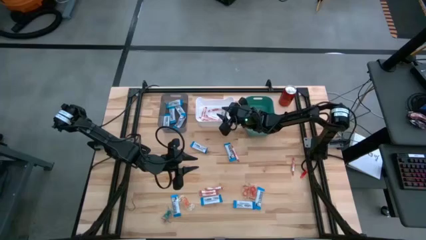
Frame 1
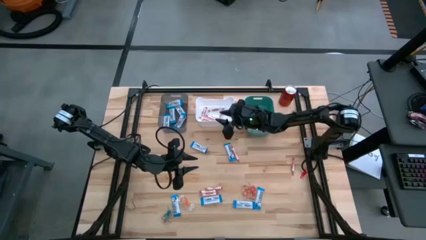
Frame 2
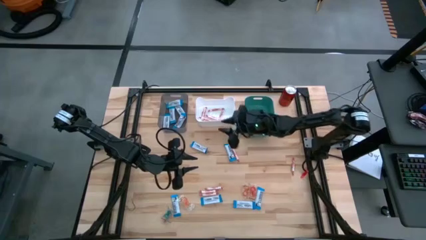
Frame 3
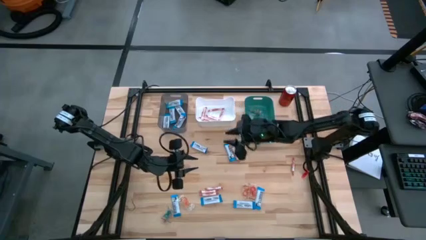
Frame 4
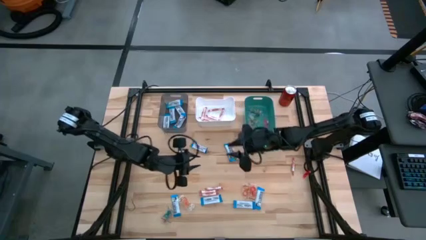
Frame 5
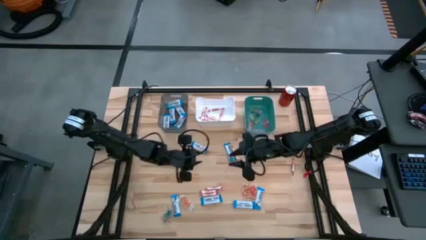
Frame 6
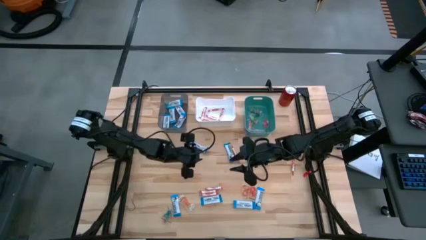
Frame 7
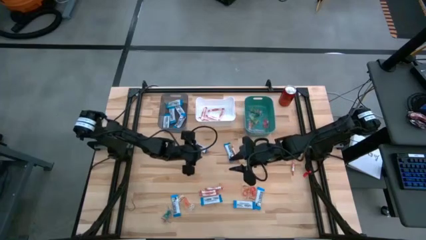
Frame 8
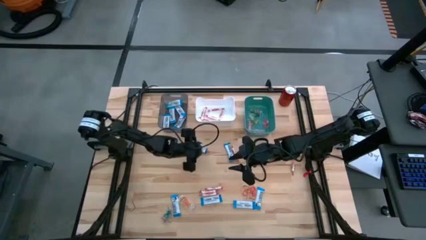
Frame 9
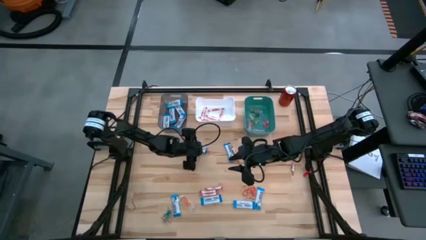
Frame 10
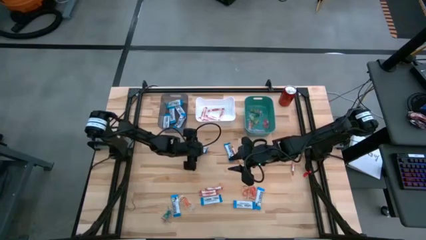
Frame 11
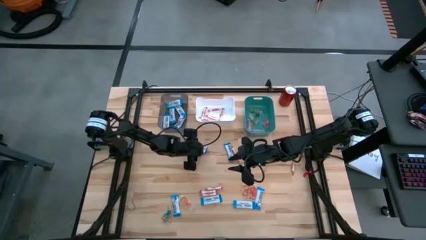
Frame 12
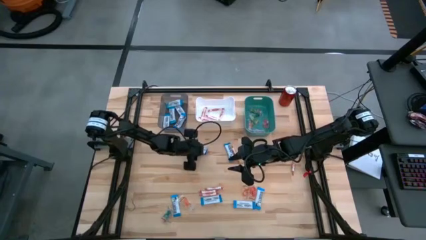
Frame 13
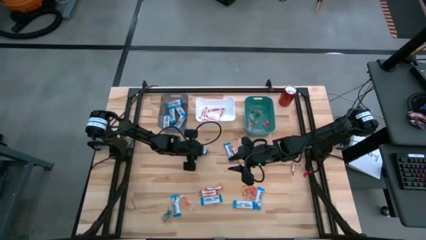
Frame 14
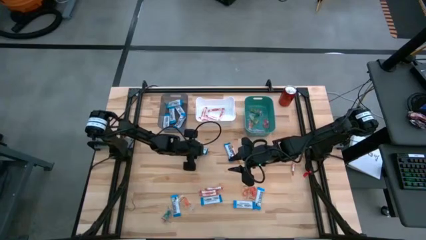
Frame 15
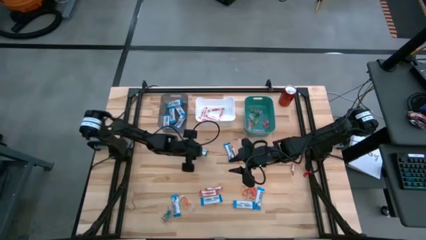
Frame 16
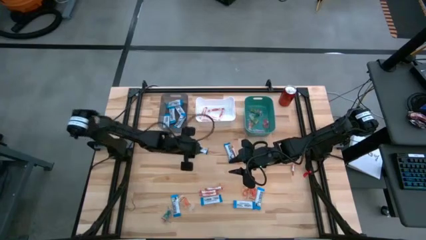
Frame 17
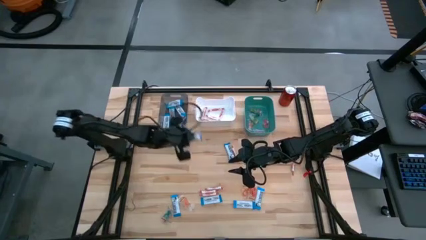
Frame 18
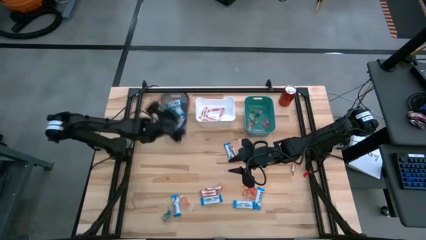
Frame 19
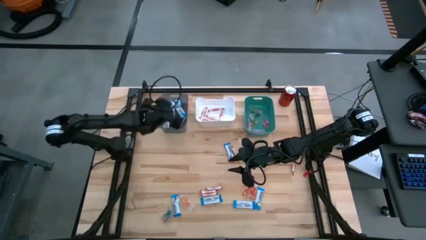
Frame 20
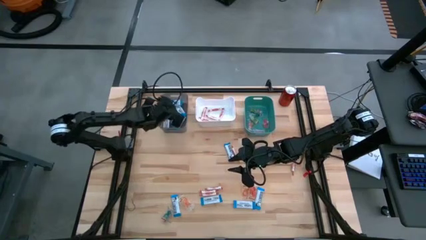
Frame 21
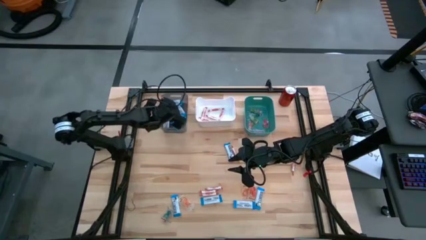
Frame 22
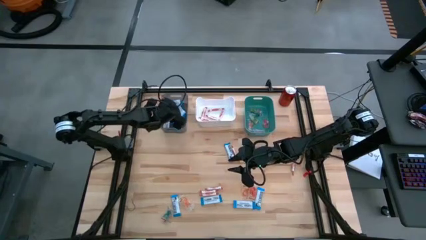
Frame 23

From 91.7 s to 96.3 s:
Task: Sort candy
Put the white chocolate into the gray bin

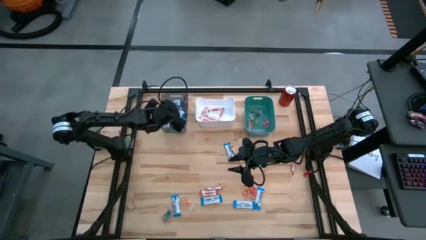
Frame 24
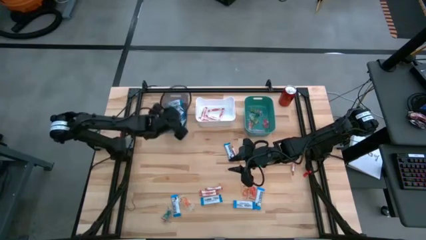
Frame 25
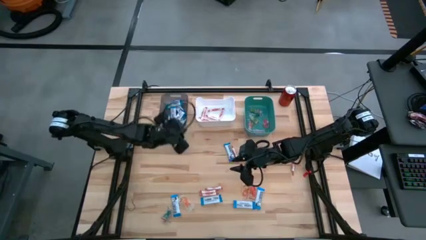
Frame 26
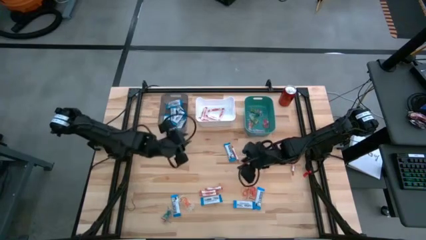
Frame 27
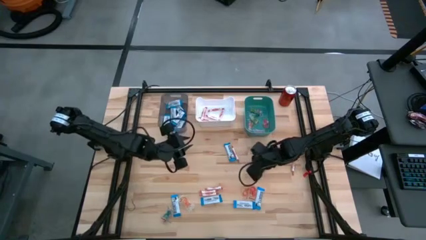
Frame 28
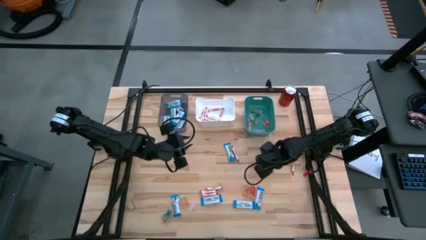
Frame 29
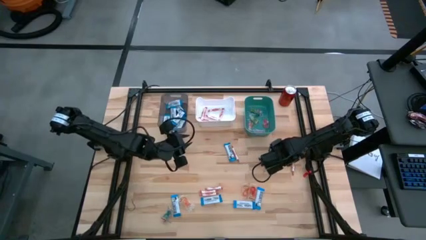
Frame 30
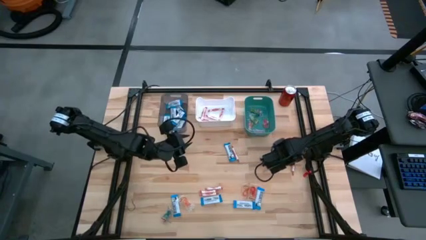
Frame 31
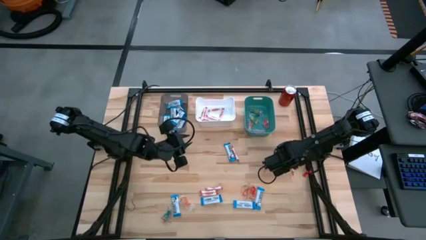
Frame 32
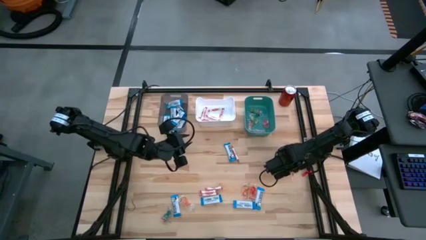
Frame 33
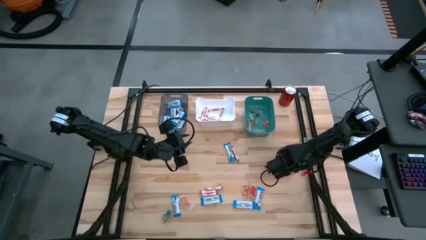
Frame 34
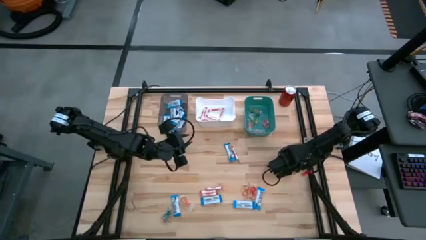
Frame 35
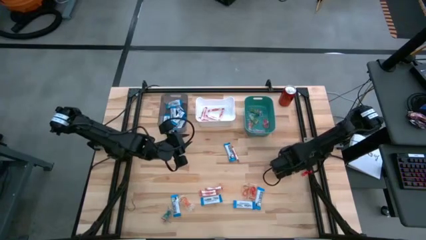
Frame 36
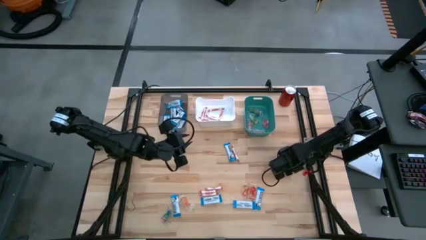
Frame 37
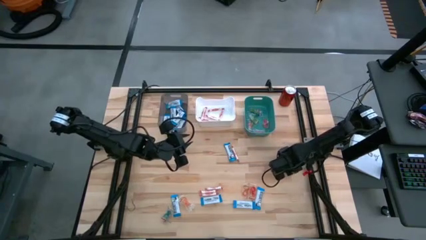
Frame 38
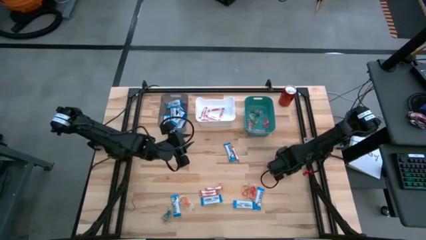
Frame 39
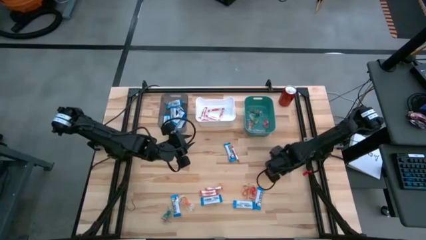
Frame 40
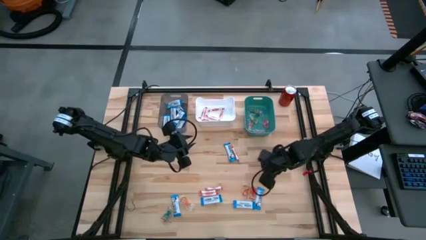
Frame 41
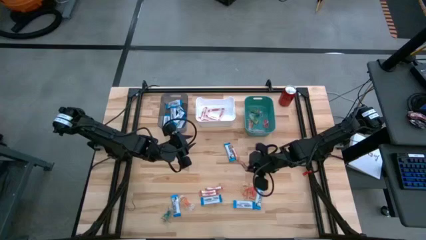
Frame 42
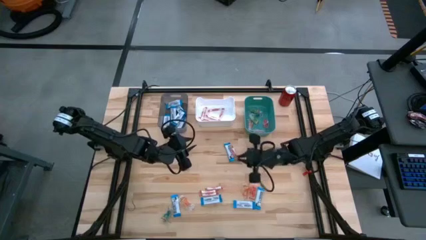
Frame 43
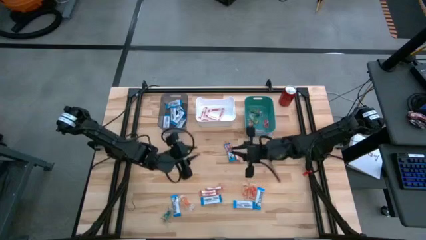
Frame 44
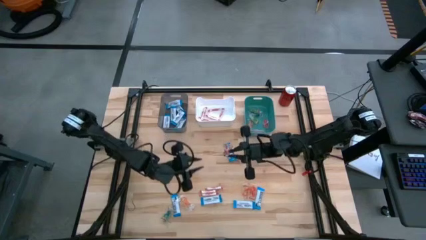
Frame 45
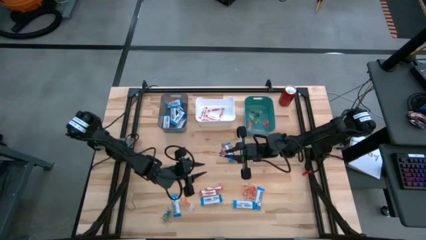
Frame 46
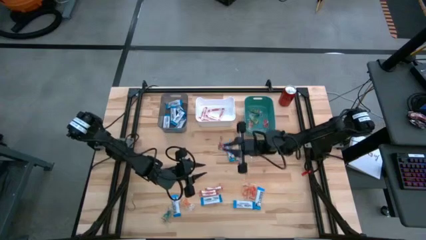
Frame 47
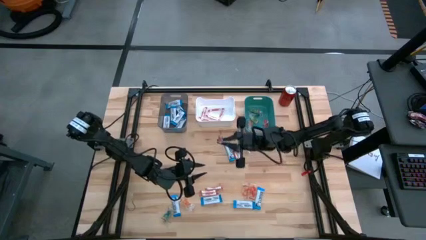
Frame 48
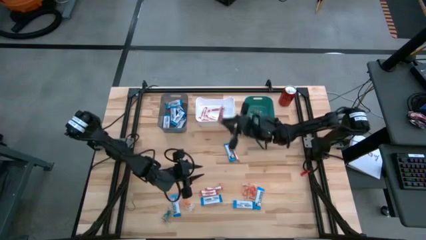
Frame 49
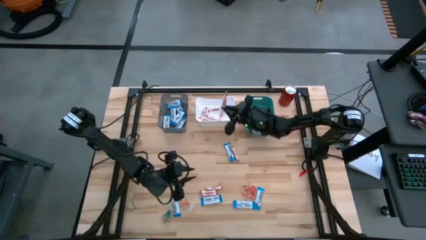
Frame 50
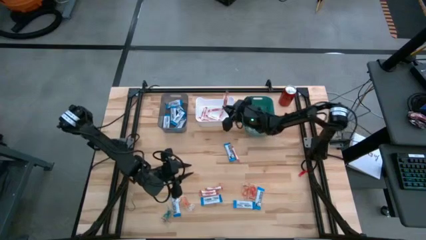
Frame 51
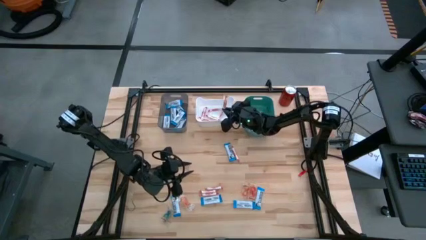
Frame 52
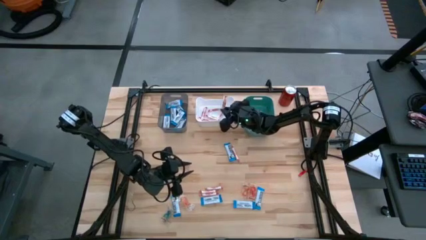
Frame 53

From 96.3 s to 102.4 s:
Put the orange candy into the white bin

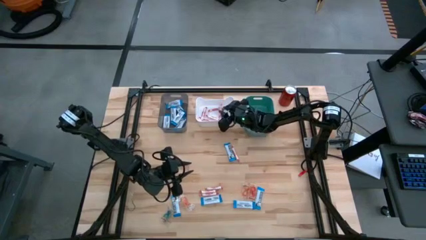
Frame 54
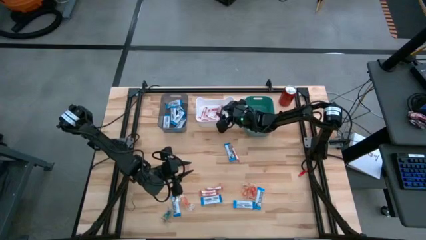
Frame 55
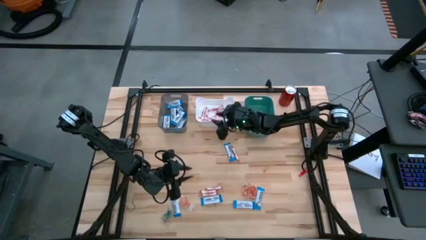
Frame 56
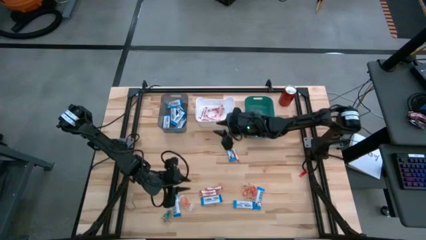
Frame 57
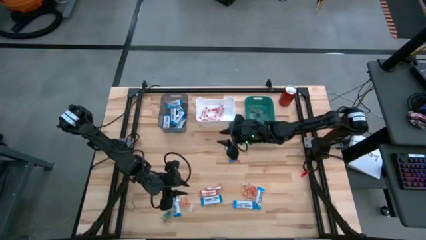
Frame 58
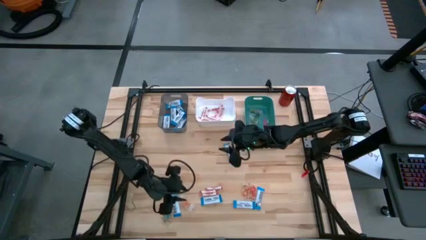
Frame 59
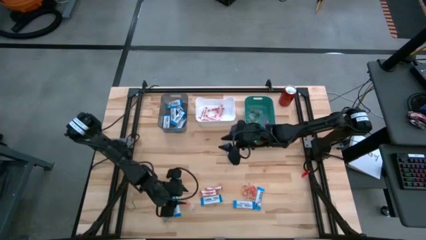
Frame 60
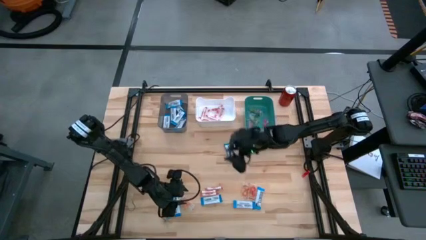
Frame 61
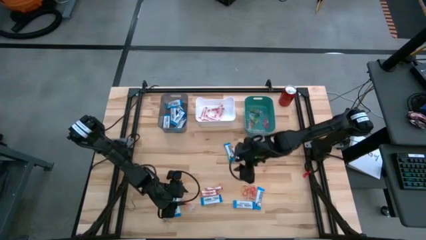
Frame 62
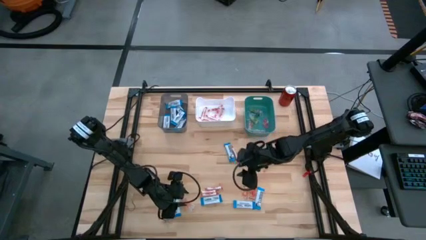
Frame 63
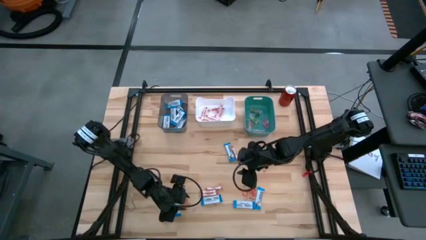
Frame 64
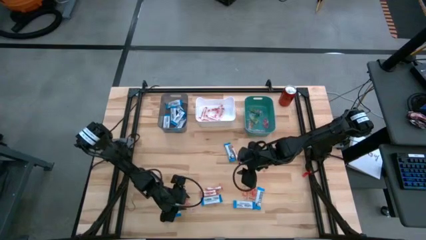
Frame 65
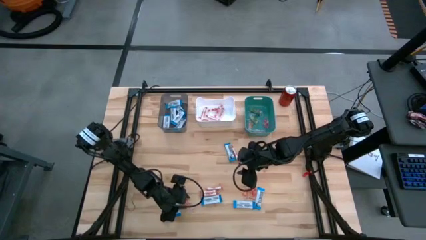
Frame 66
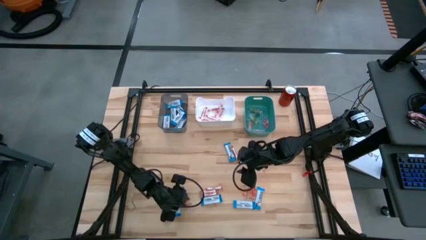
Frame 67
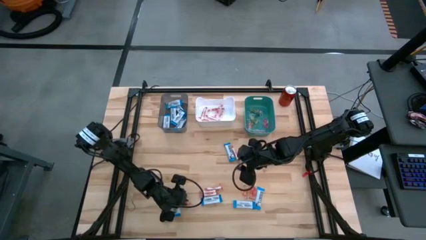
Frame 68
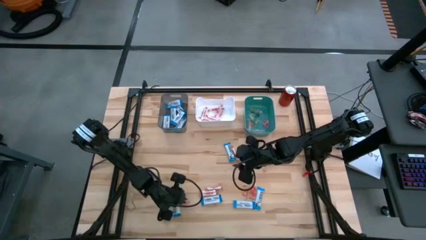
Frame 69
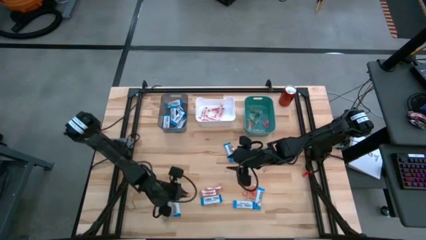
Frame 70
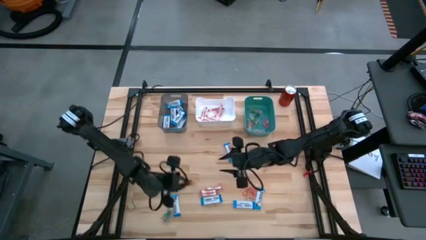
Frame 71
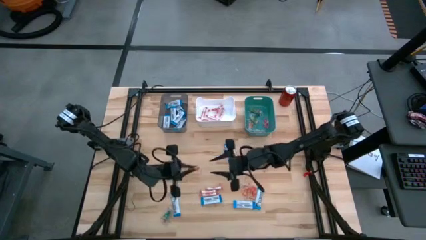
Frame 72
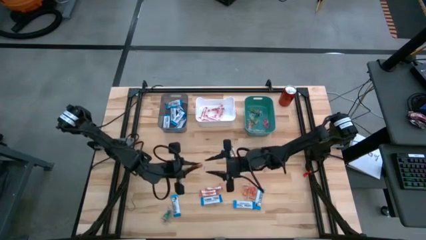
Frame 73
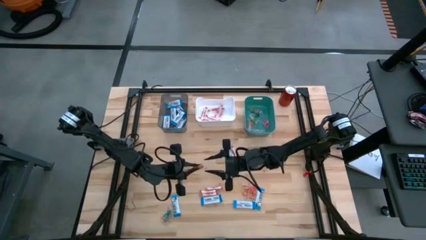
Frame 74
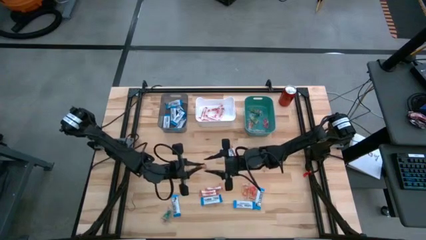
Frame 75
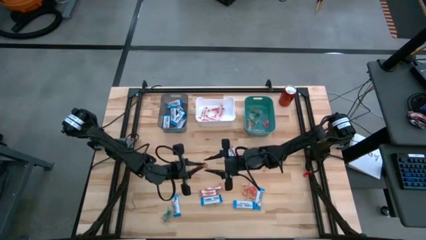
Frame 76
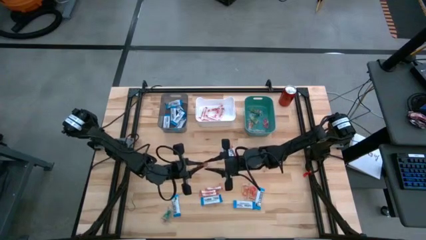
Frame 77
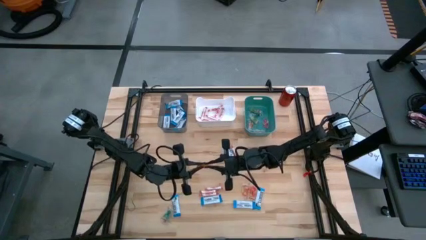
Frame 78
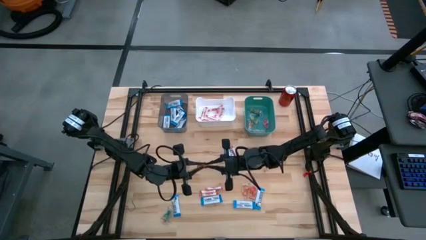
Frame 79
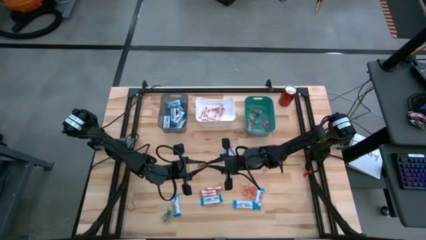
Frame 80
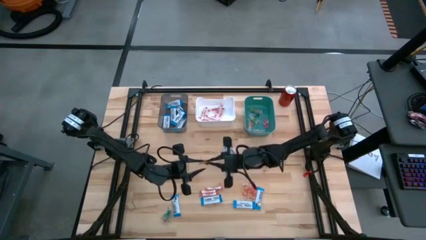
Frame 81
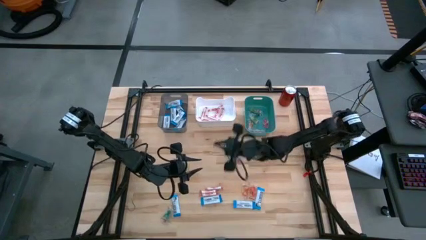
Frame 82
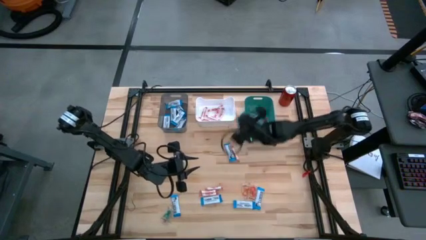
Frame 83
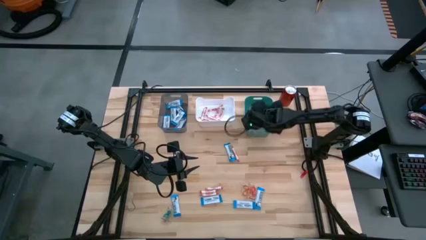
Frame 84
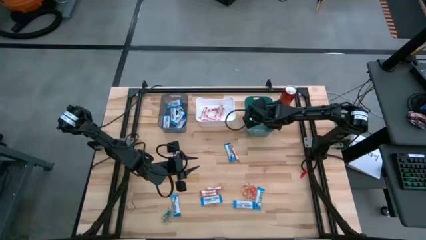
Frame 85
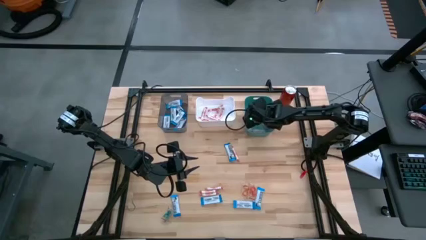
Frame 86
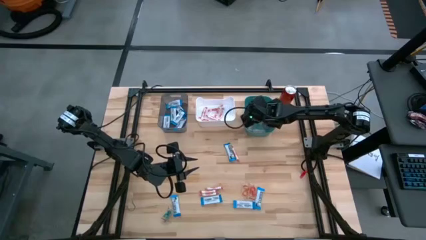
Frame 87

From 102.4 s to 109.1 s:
Put the transparent candy into the green bin
